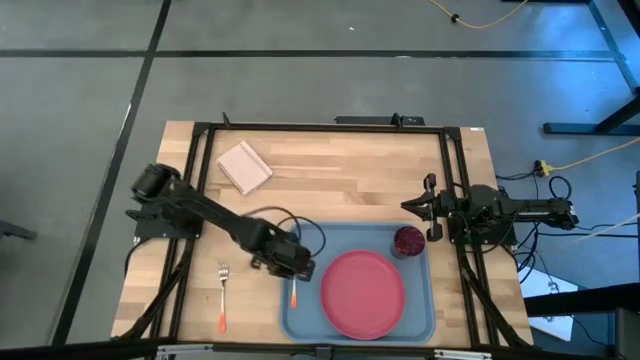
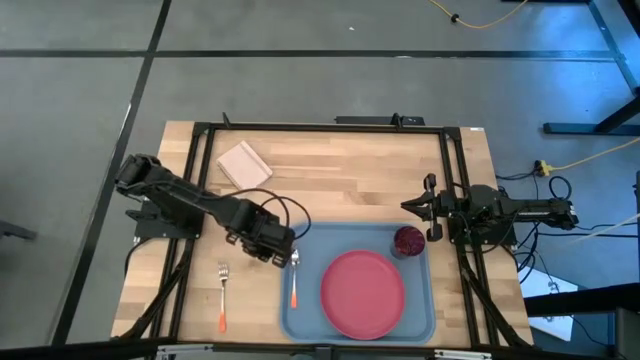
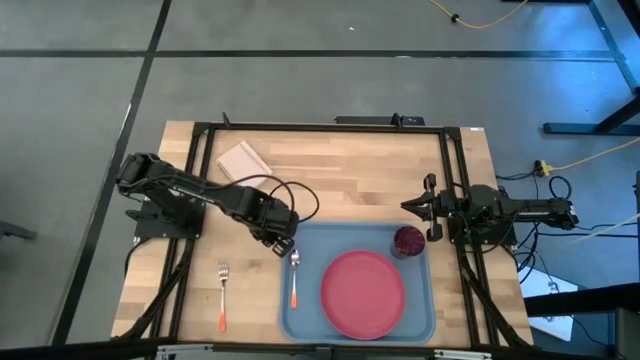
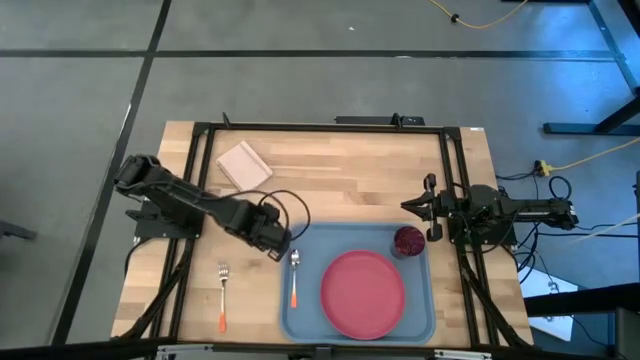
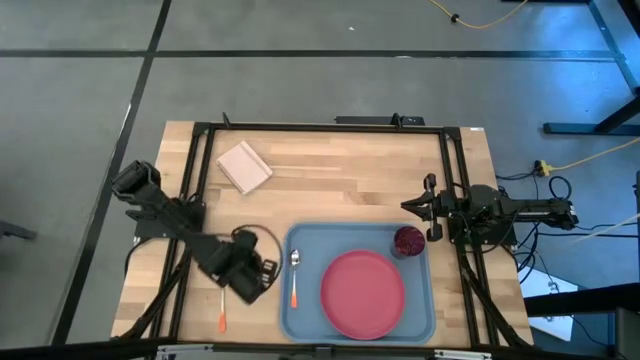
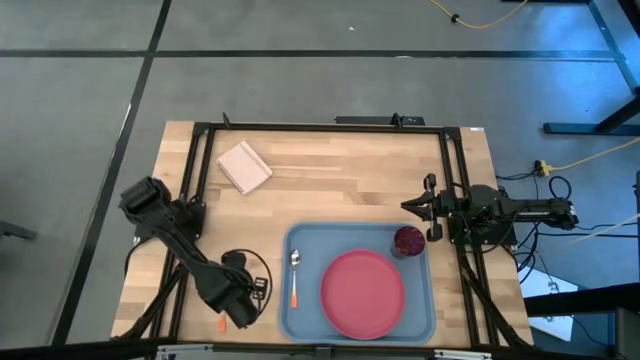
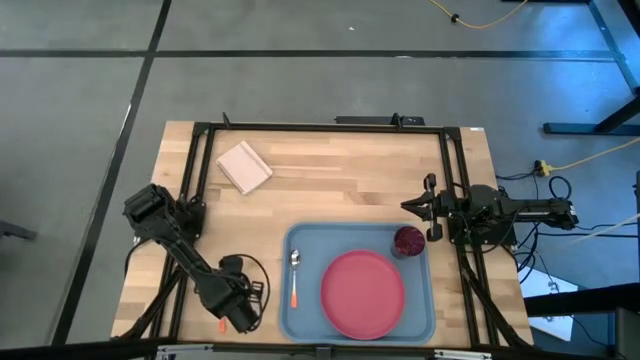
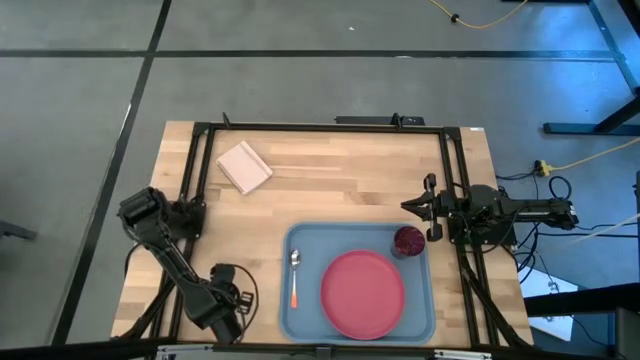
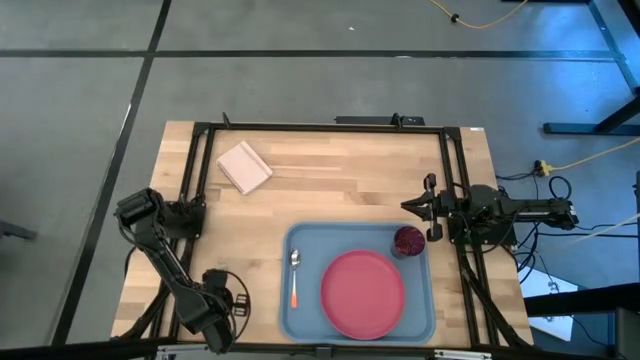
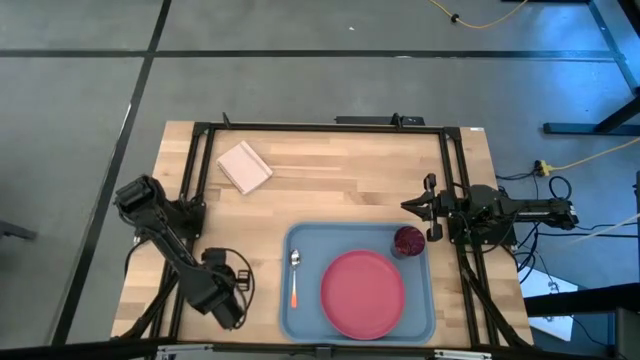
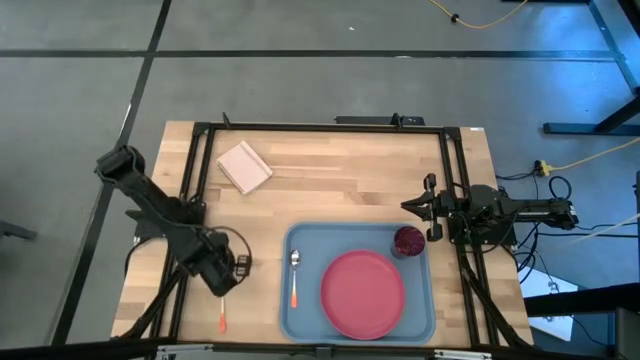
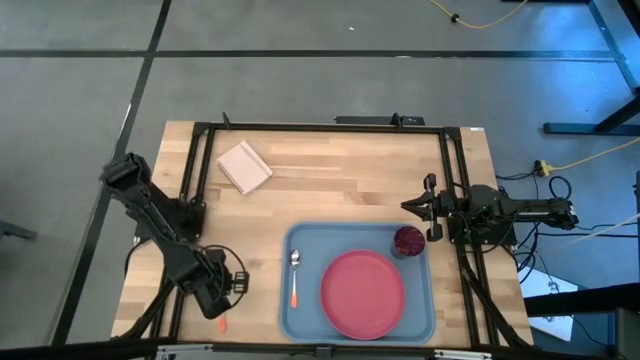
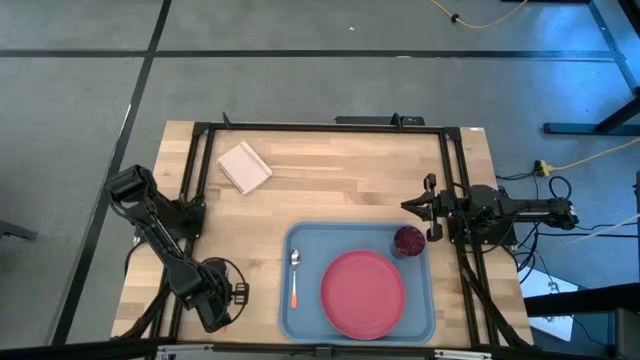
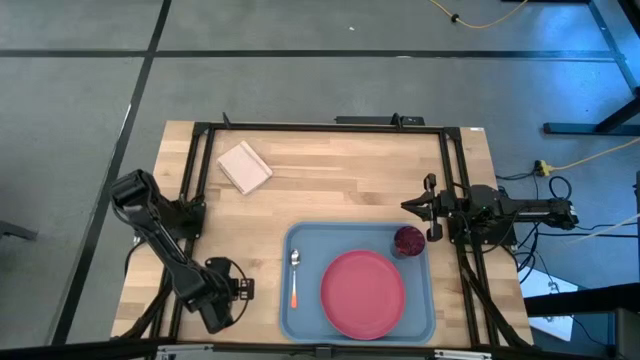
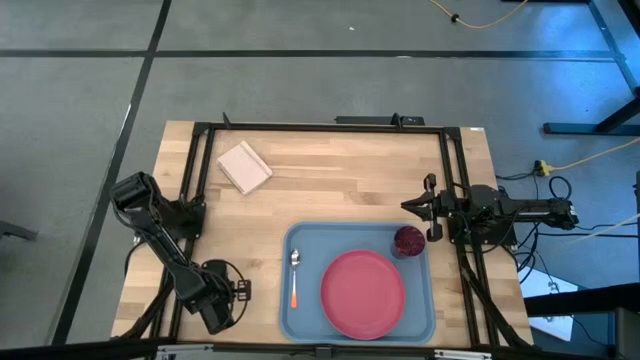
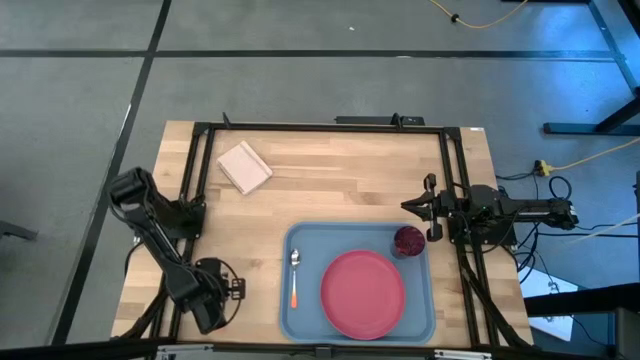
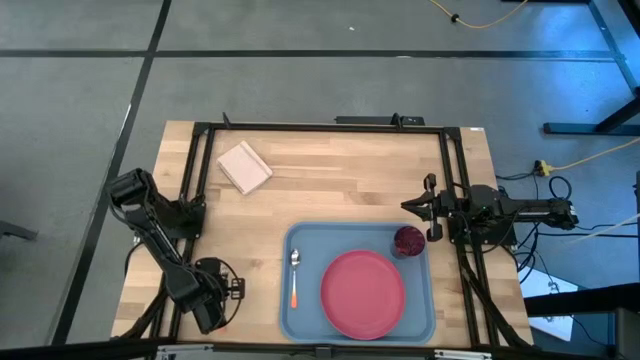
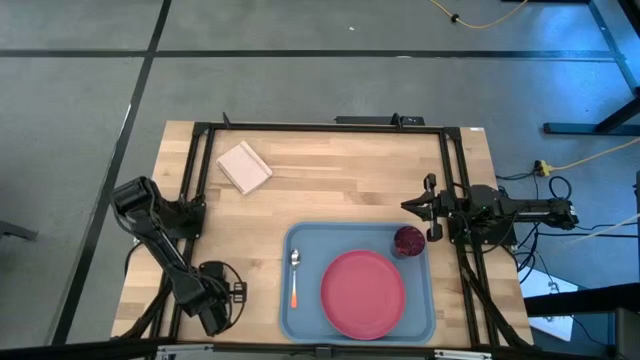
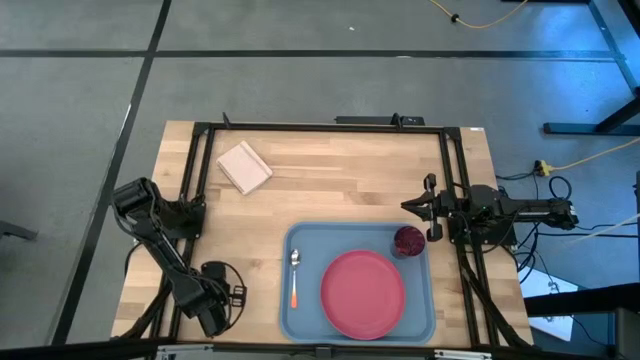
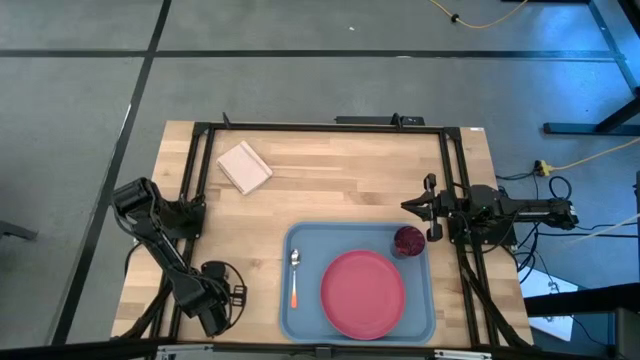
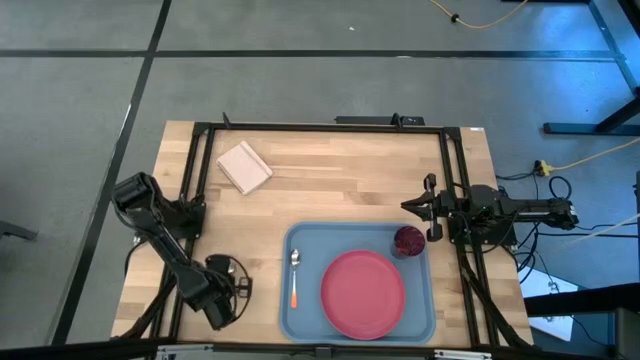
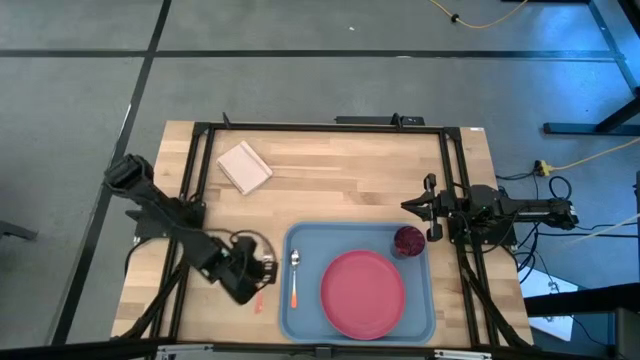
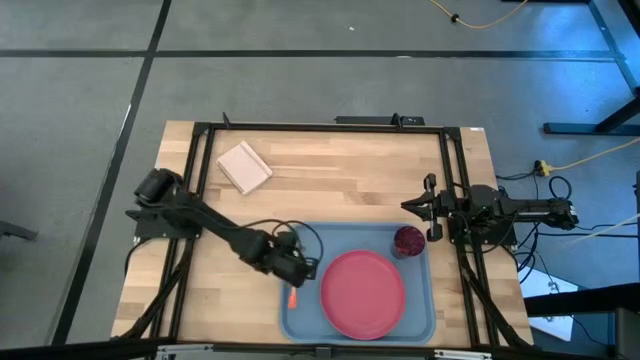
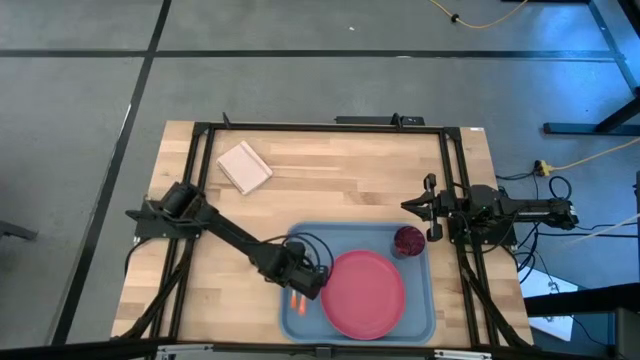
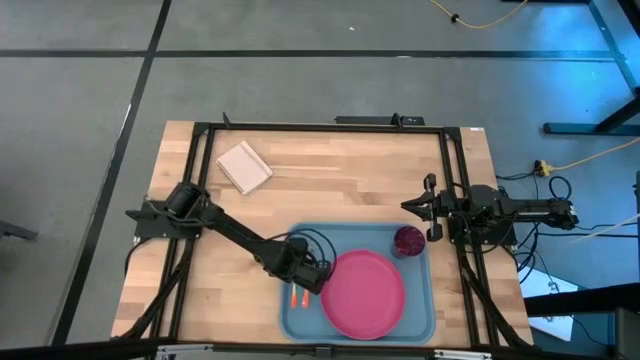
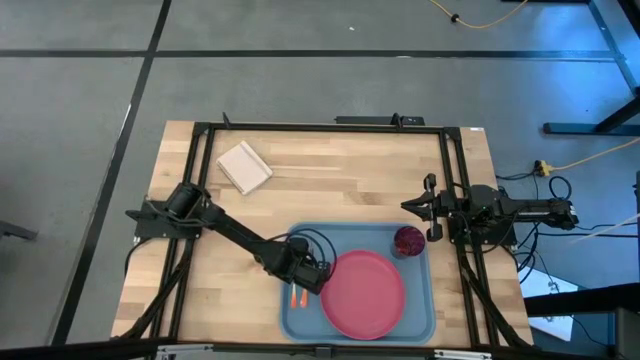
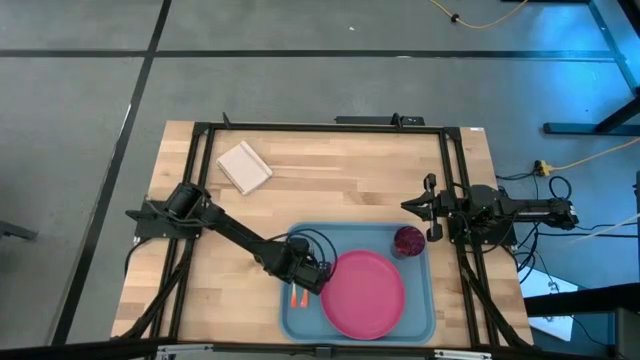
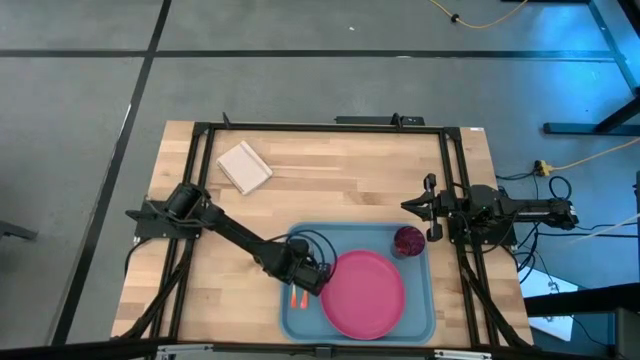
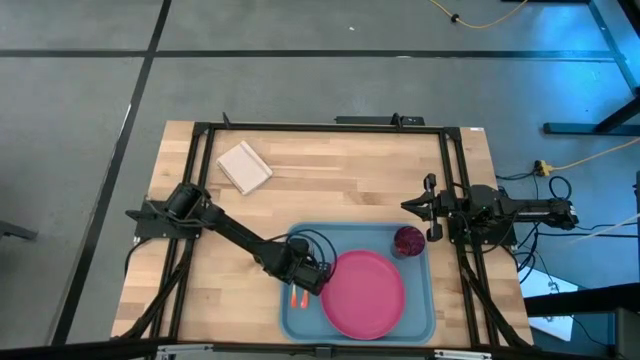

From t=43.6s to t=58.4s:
Task: Pick and place plate/cup/fork/spoon on tray
Put the orange fork on the serving tray between the orange spoon and the pink plate

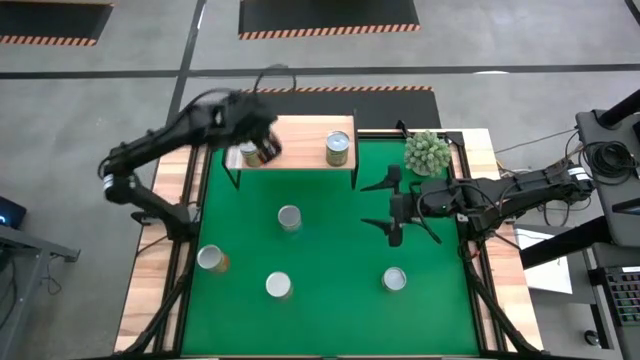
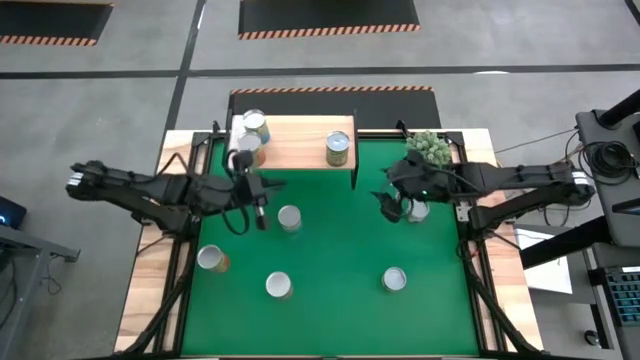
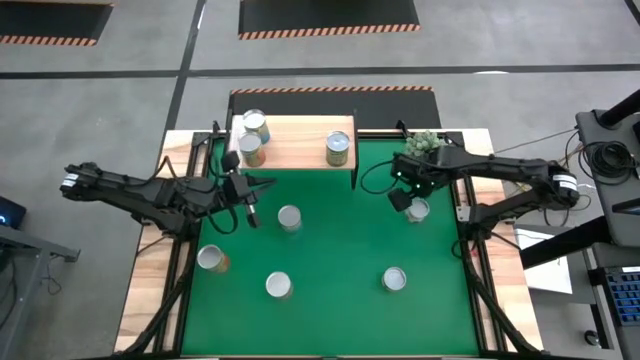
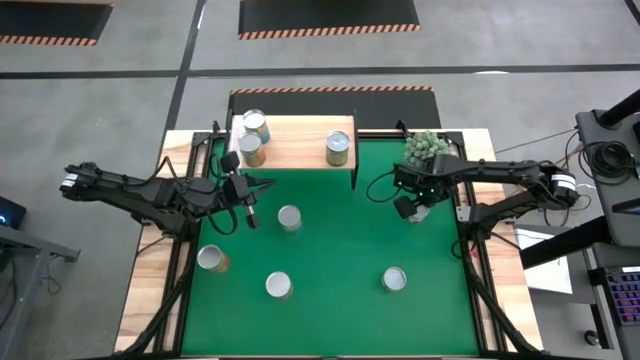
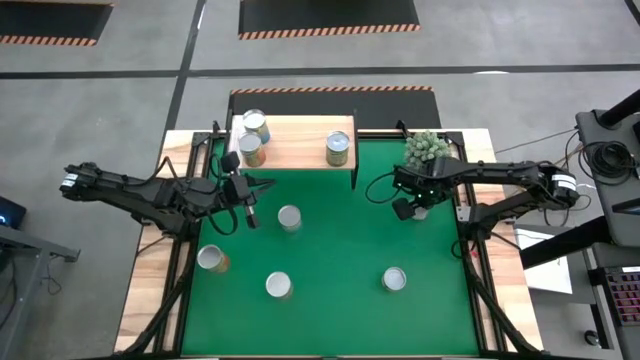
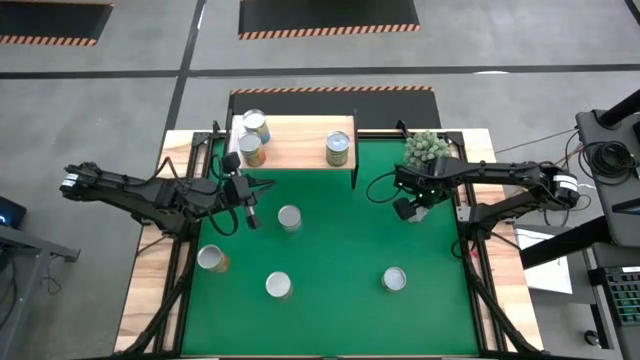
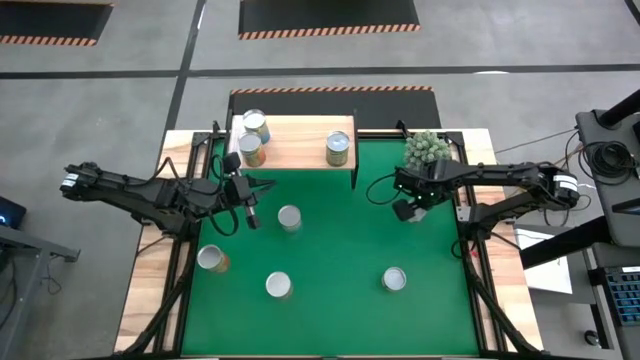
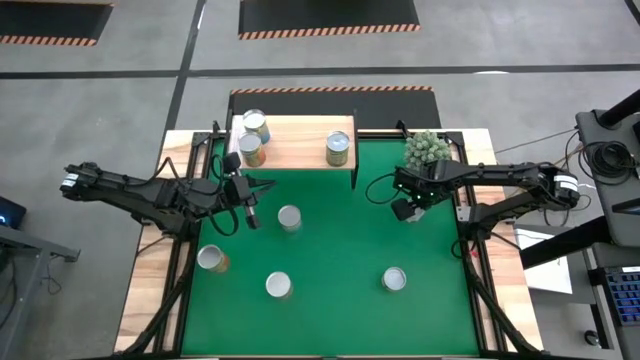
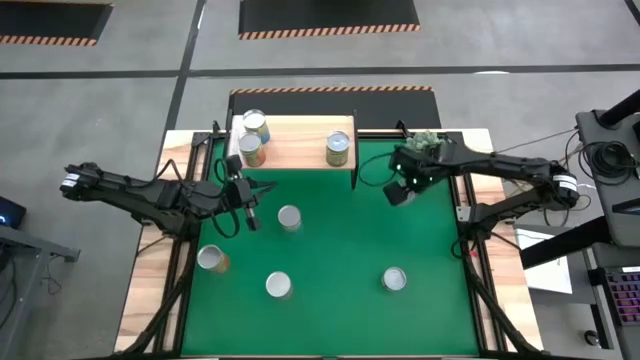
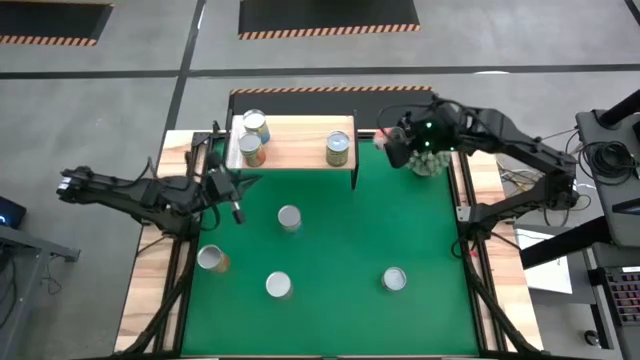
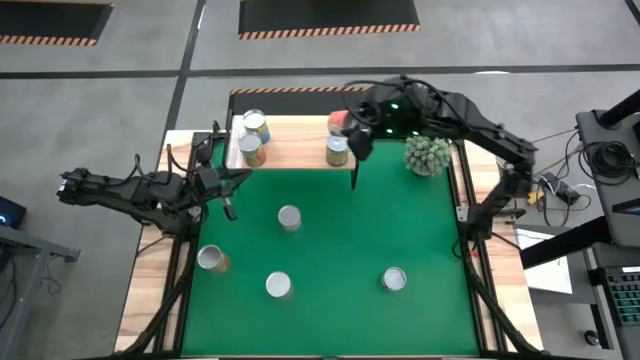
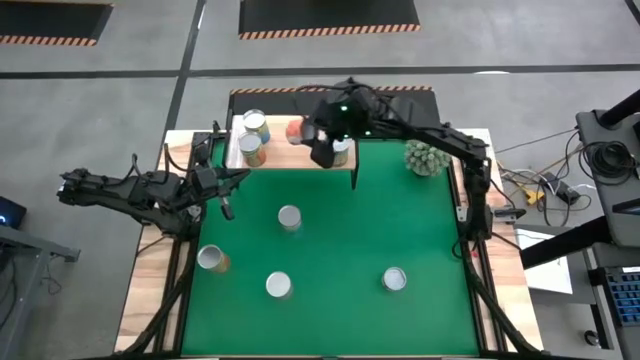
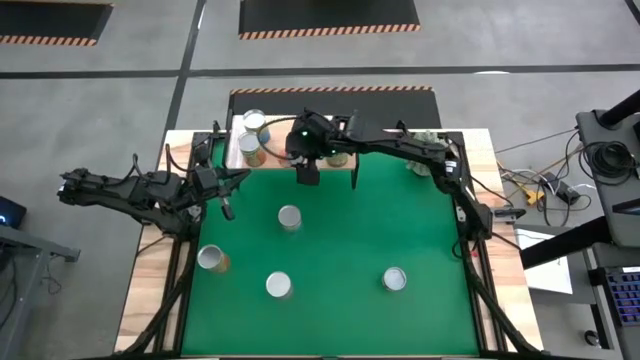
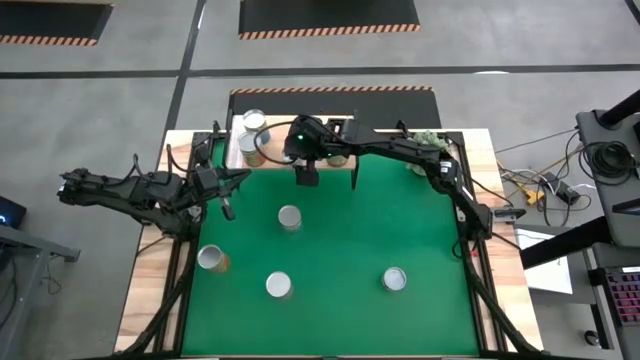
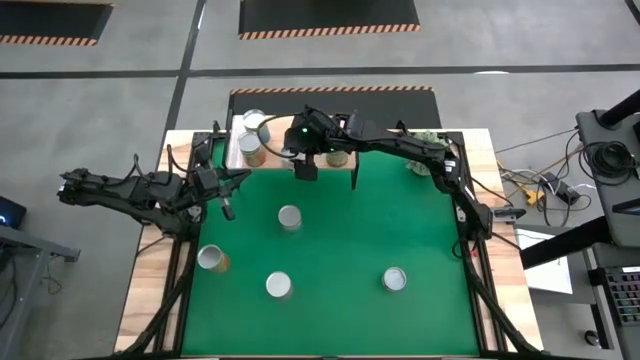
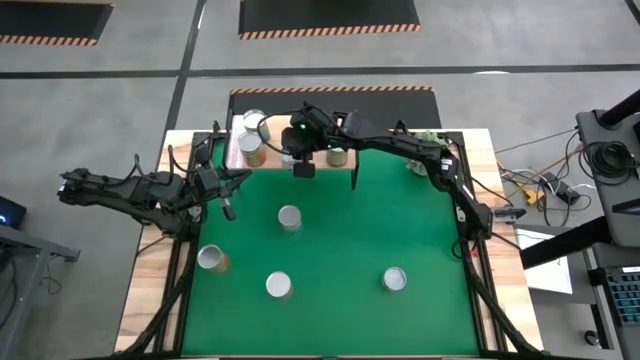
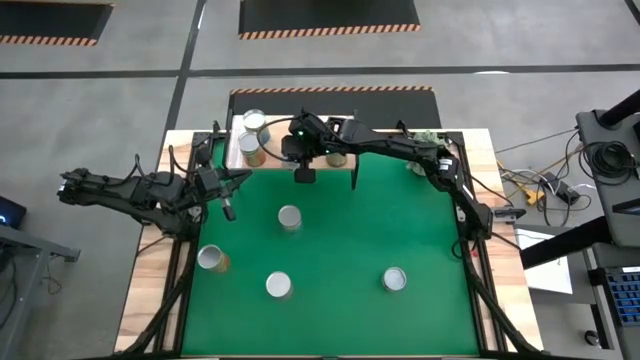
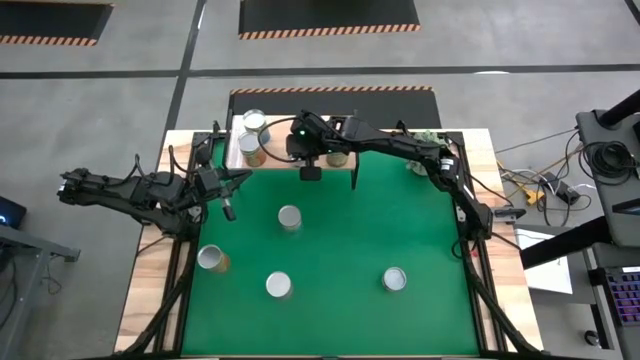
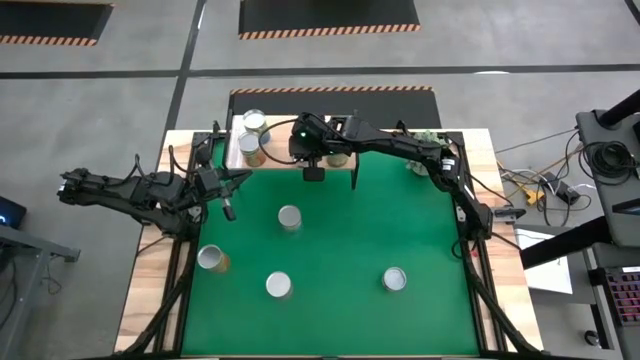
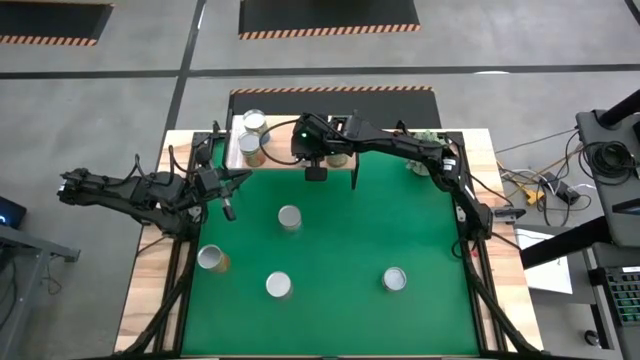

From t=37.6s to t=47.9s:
Task: Pick and place cans onto a shelf
Put the canned saucy meatballs on the shelf
